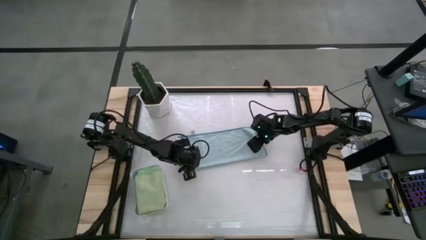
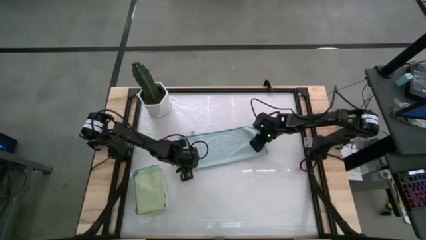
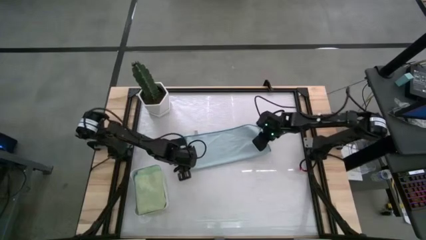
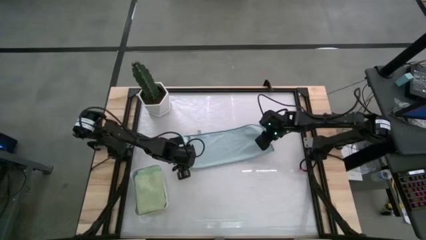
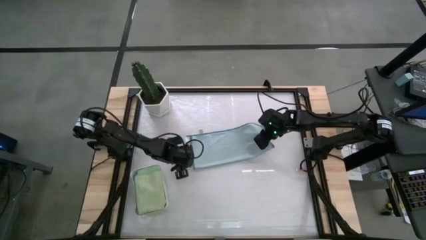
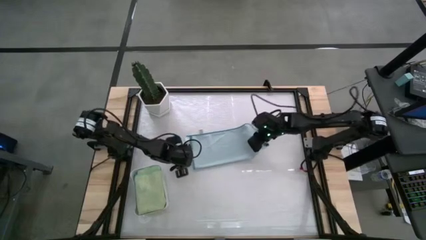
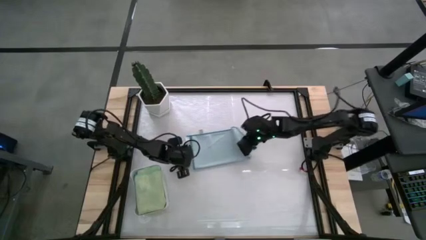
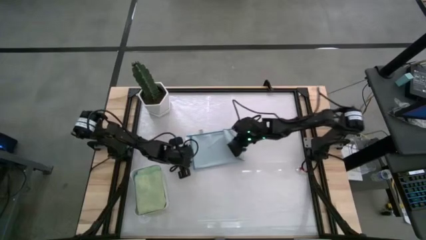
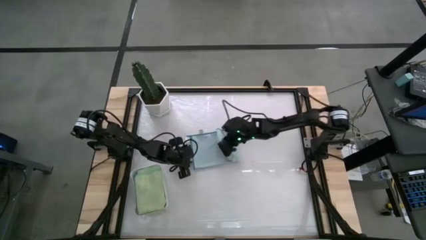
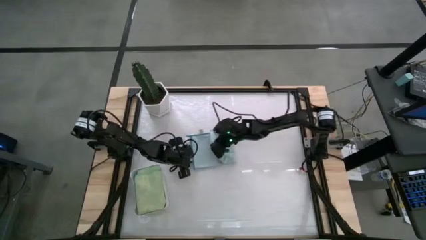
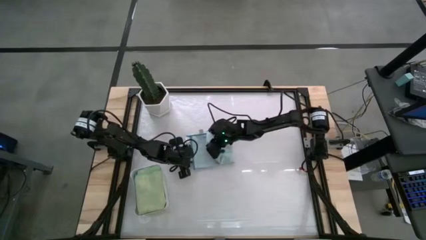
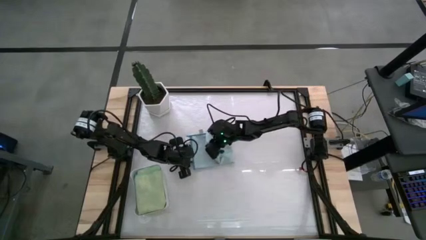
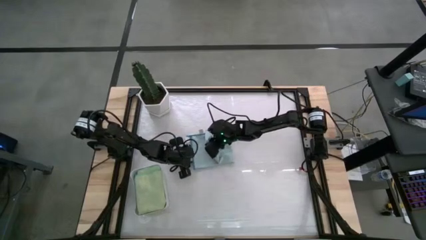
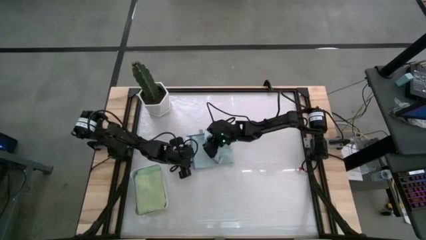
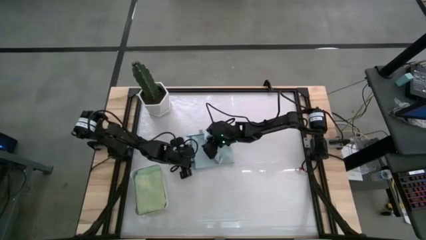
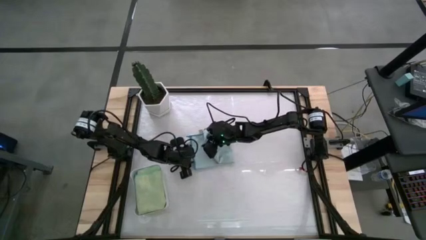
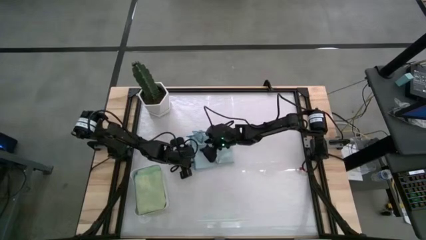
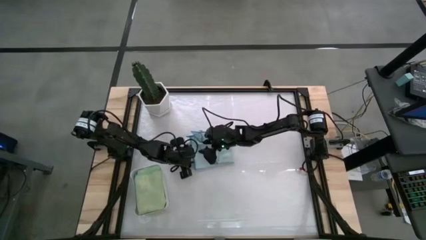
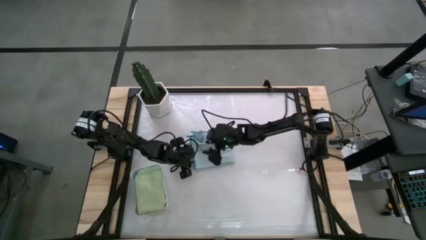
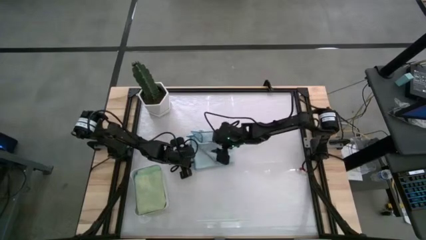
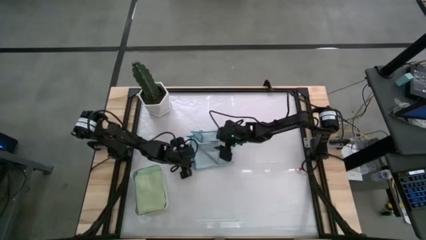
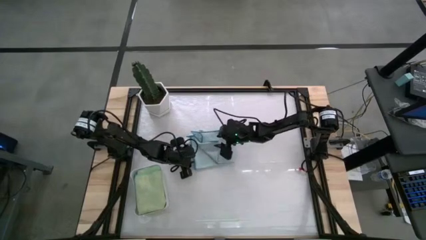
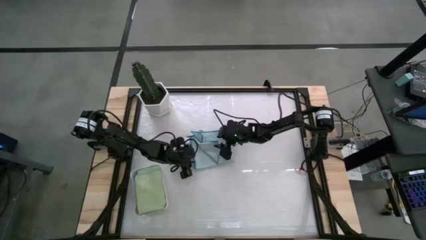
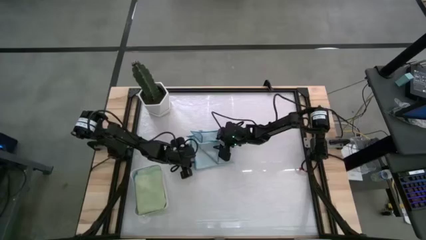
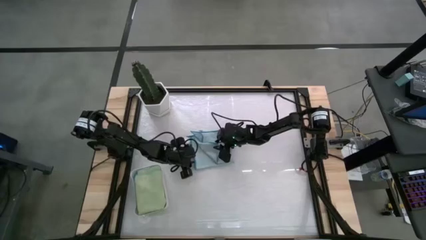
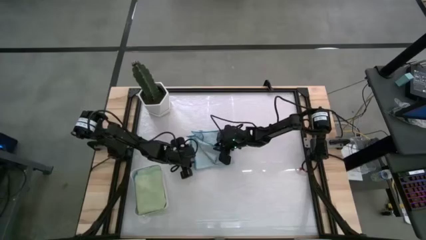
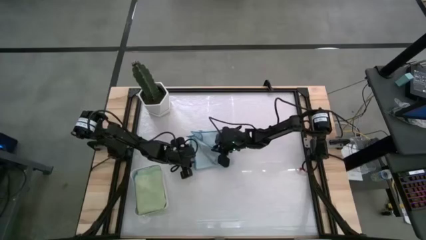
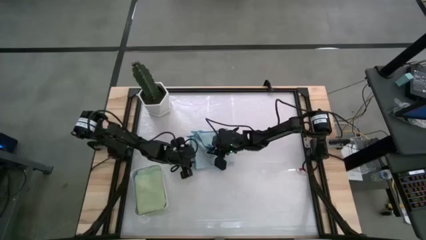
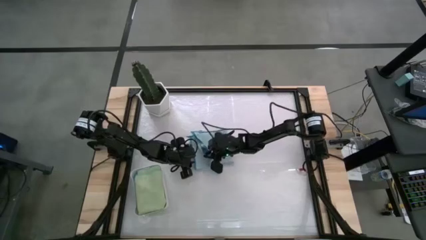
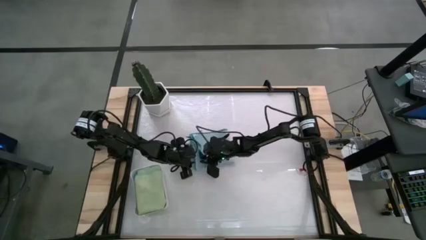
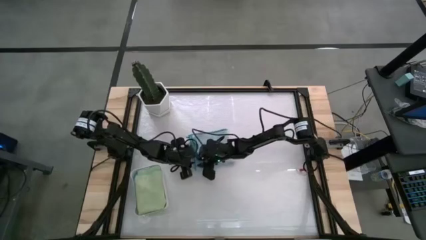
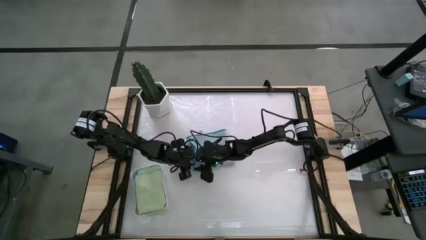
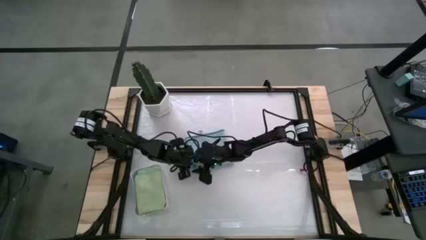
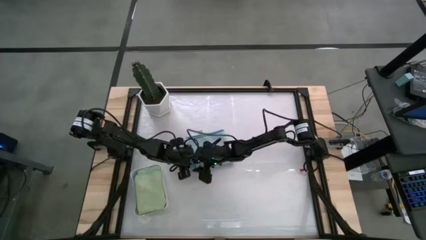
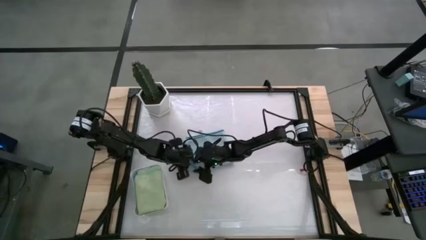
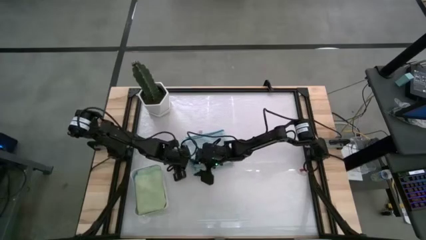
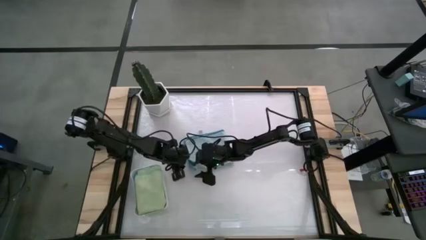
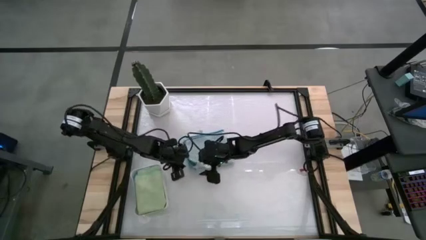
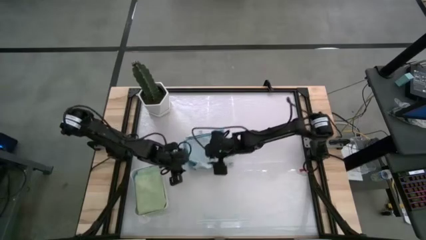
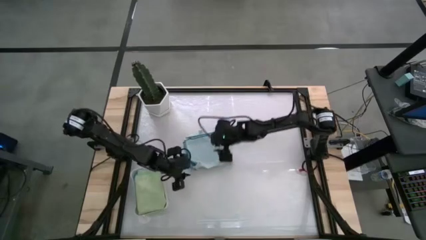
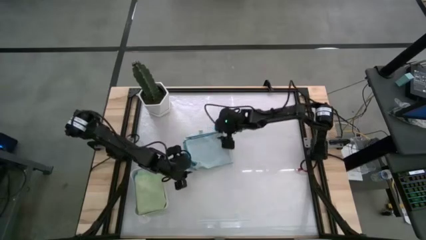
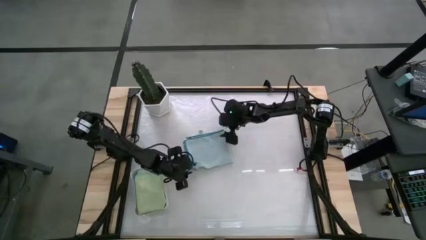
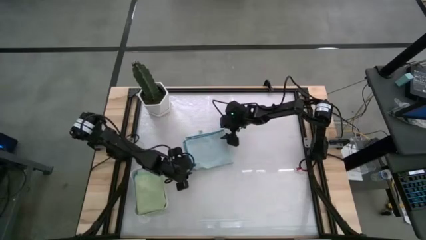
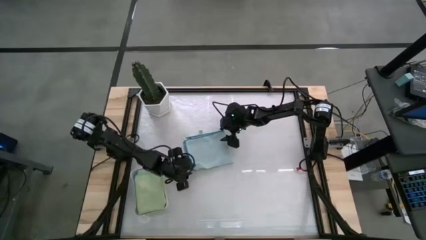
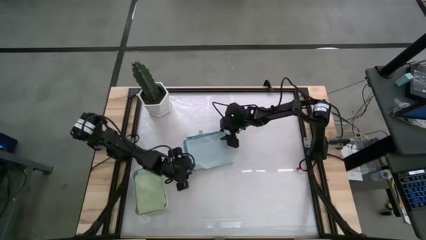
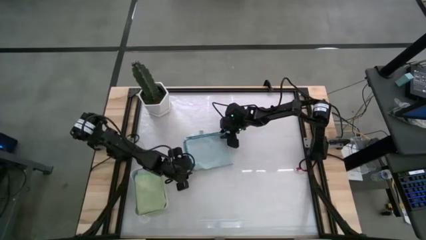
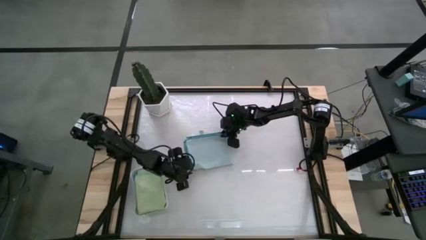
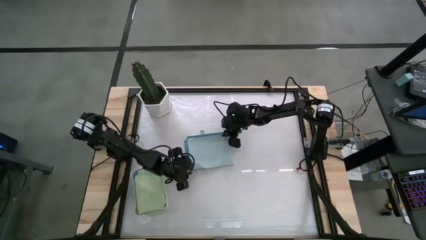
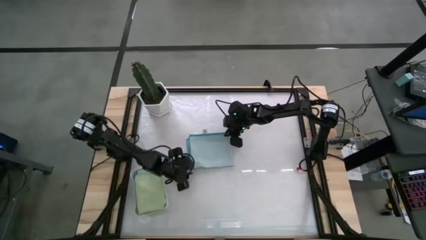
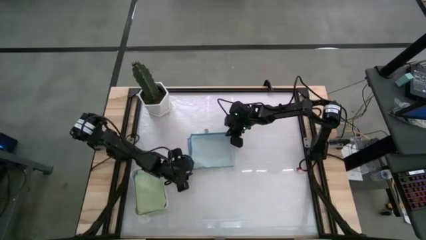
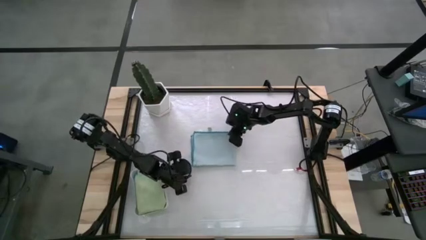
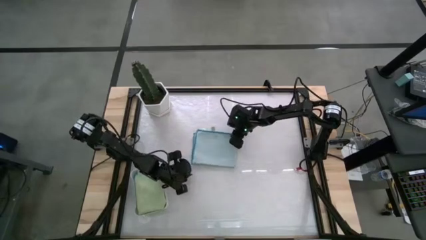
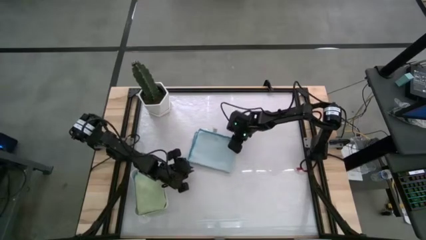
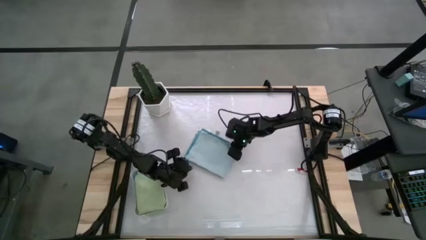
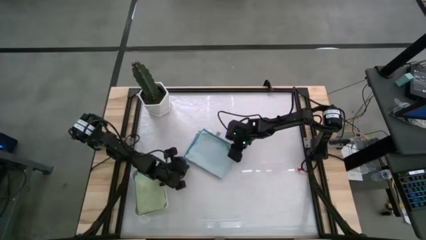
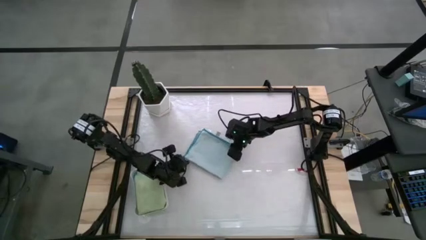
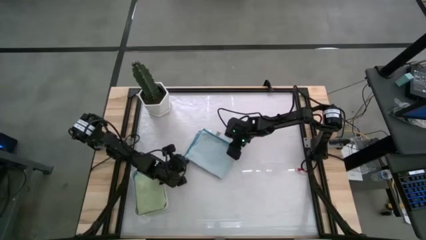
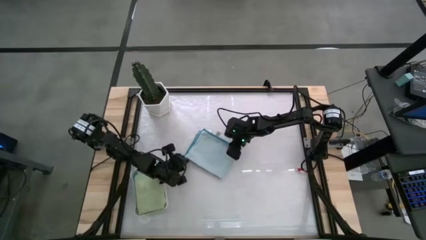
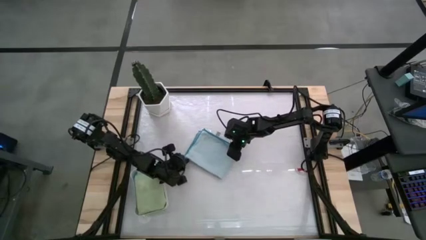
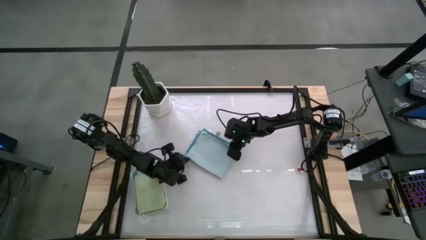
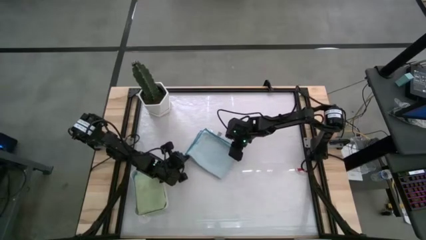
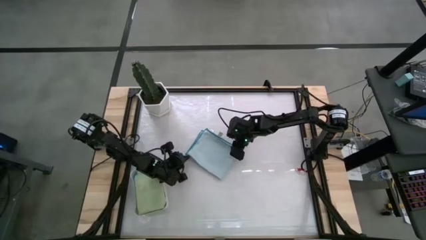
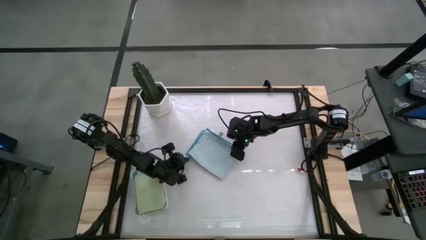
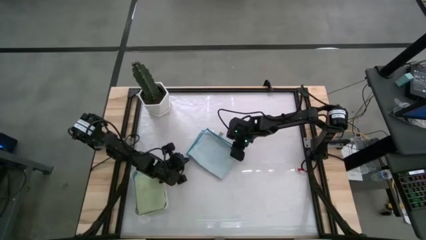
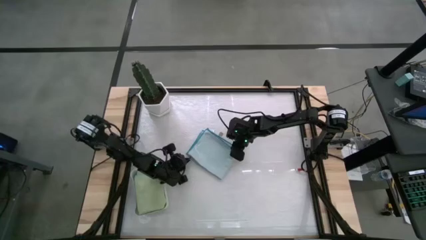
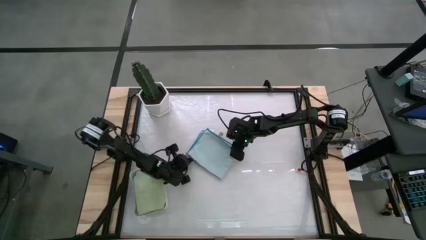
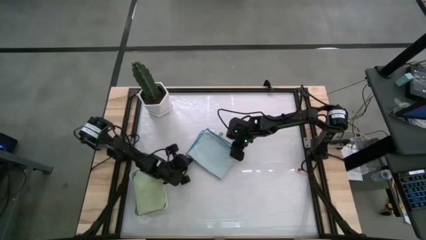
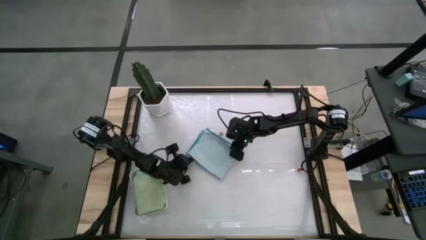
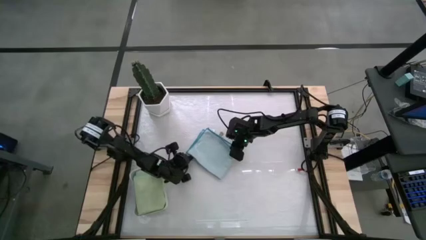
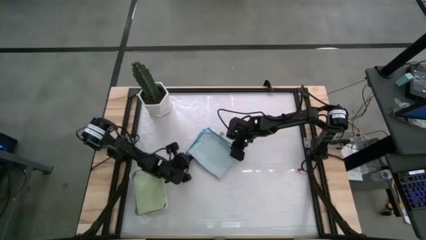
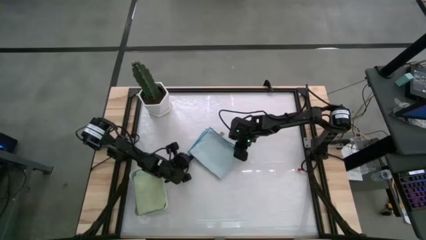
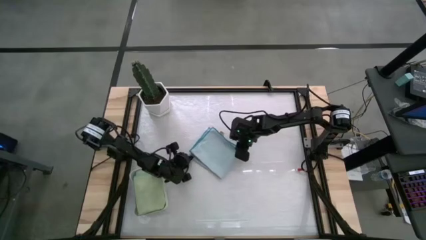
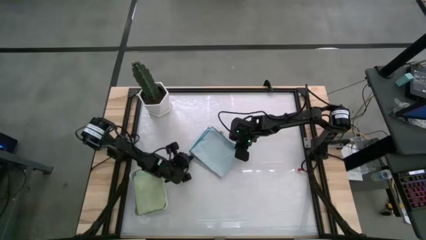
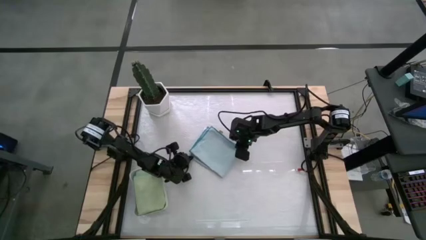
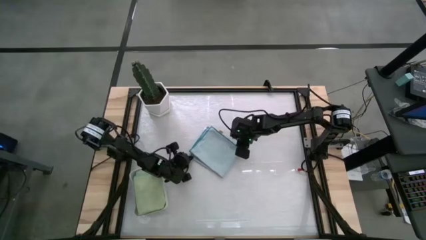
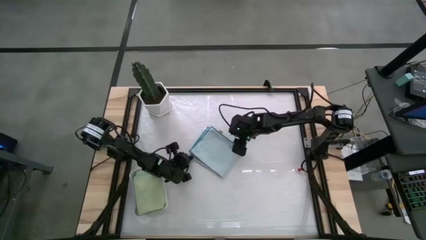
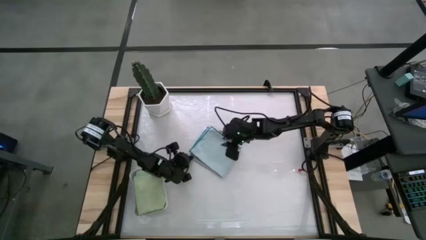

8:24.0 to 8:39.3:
Task: Fold microfiber towels
Fold the light blue microfiber towel
